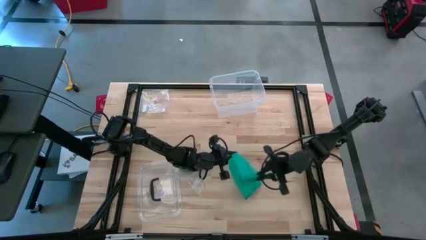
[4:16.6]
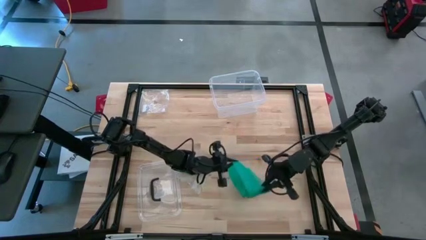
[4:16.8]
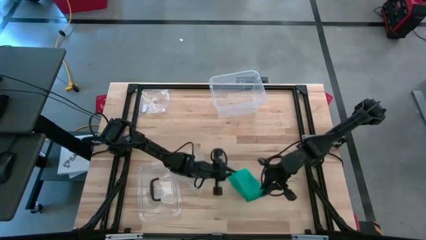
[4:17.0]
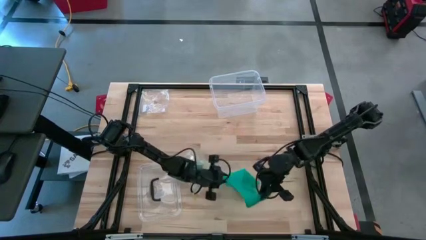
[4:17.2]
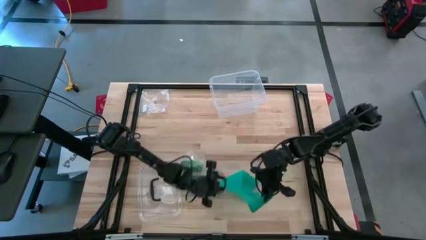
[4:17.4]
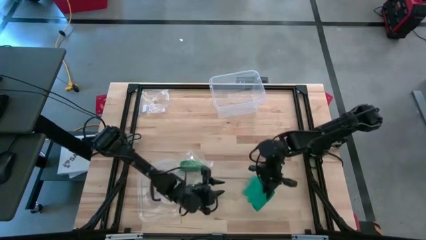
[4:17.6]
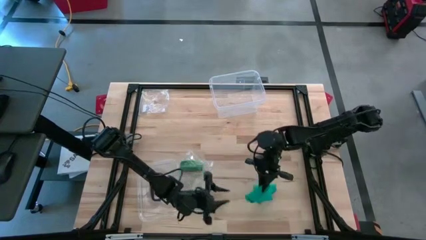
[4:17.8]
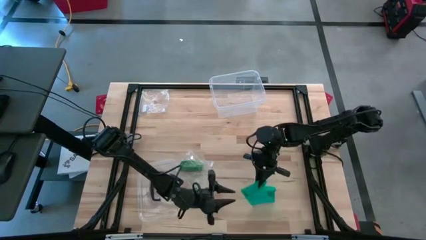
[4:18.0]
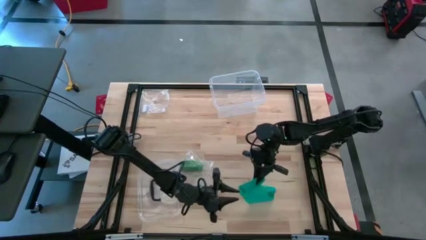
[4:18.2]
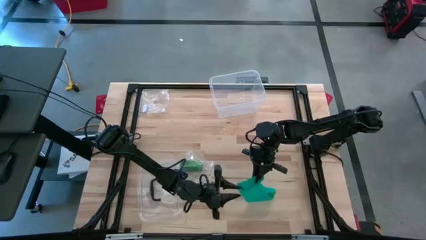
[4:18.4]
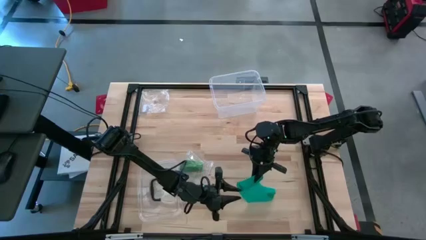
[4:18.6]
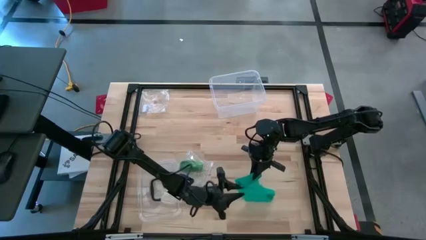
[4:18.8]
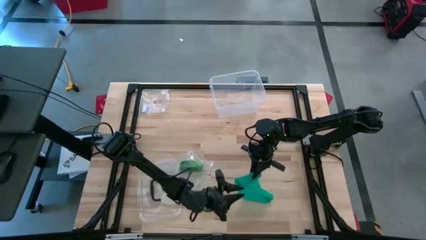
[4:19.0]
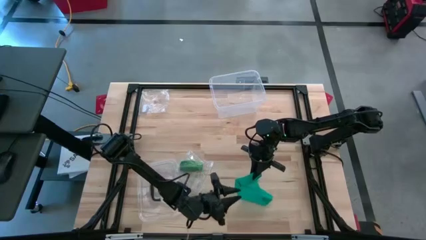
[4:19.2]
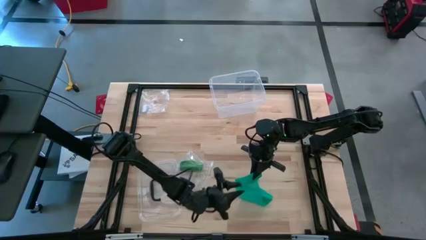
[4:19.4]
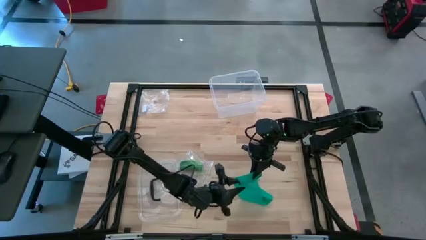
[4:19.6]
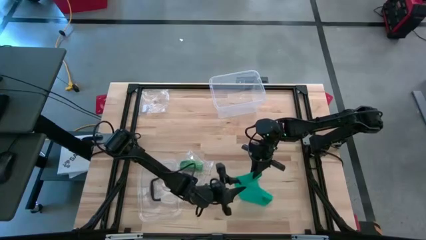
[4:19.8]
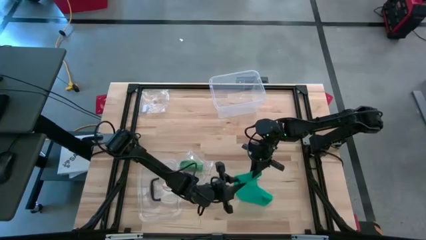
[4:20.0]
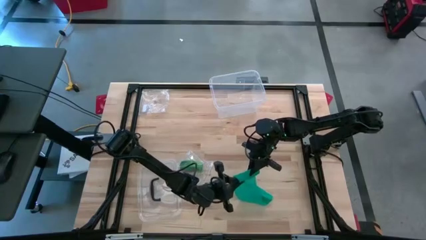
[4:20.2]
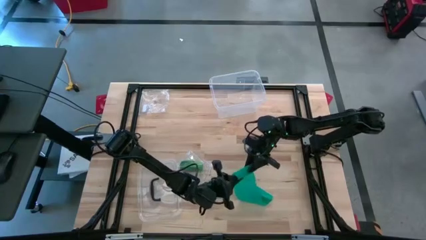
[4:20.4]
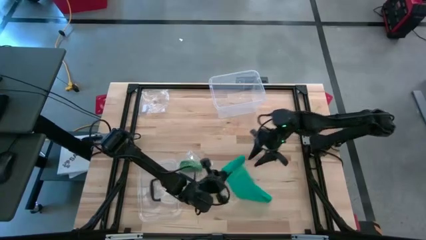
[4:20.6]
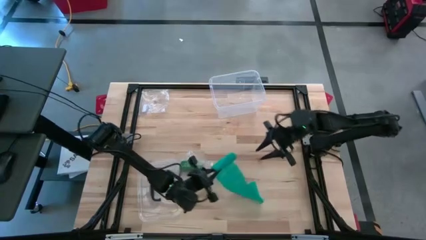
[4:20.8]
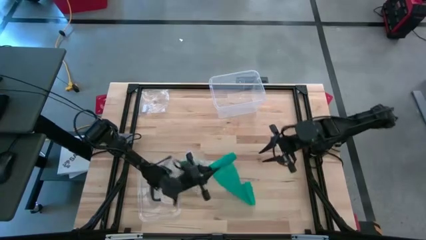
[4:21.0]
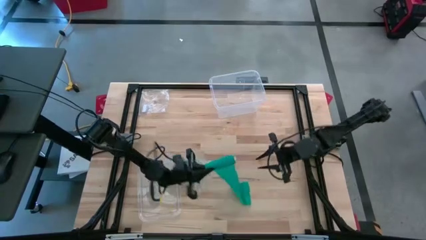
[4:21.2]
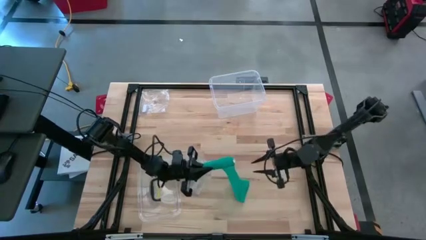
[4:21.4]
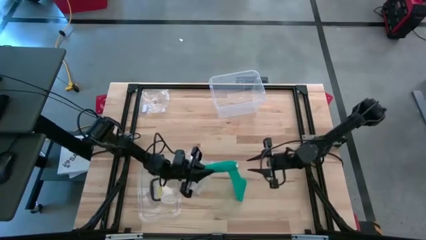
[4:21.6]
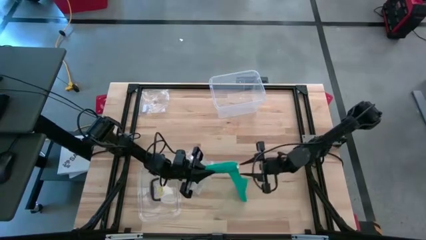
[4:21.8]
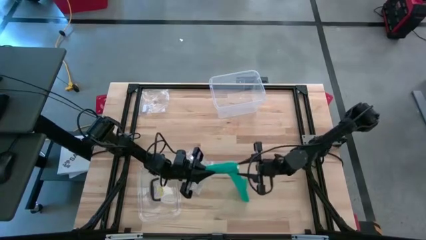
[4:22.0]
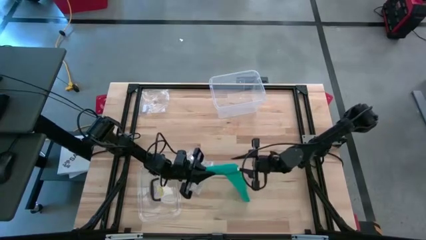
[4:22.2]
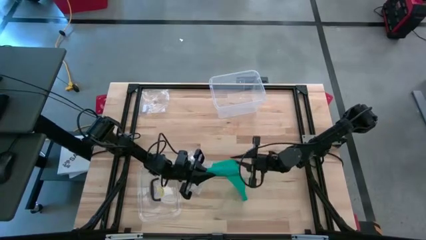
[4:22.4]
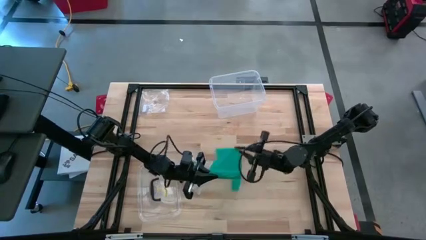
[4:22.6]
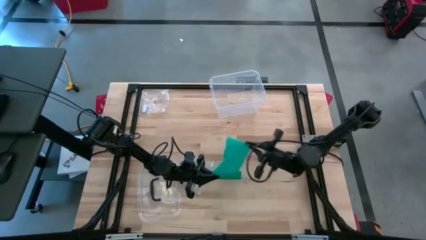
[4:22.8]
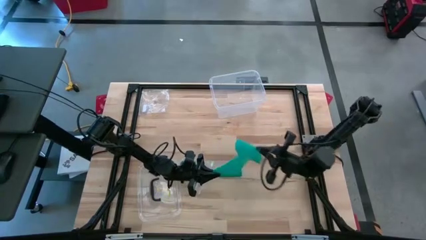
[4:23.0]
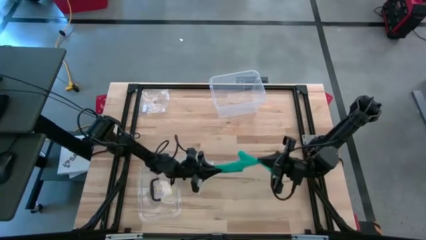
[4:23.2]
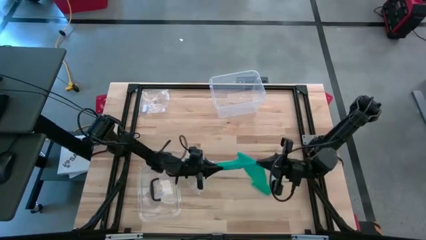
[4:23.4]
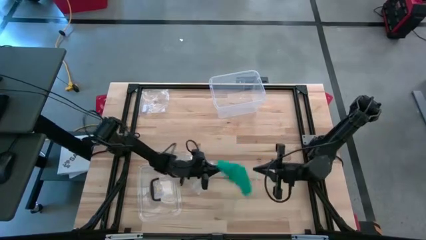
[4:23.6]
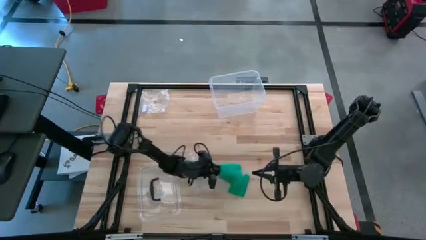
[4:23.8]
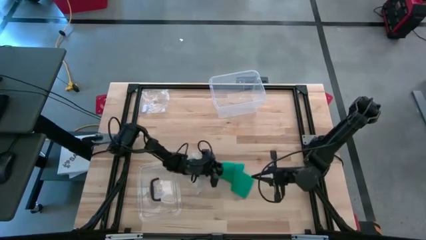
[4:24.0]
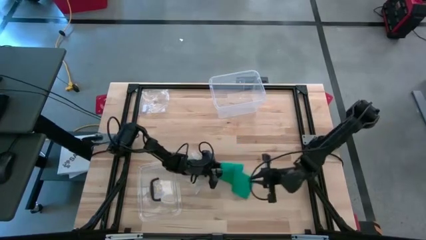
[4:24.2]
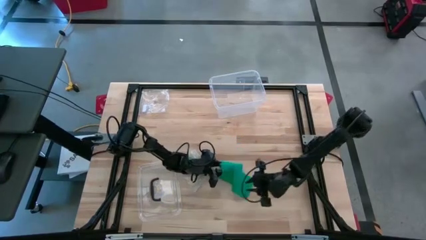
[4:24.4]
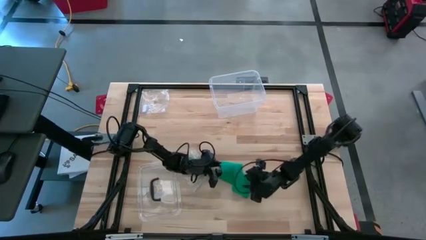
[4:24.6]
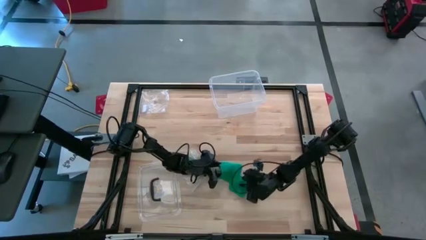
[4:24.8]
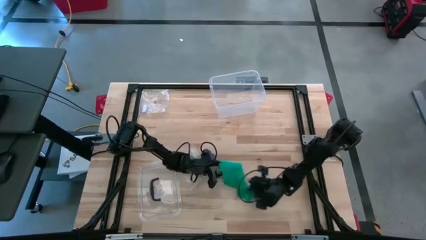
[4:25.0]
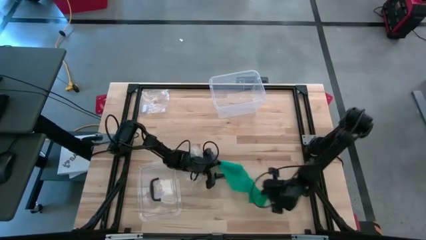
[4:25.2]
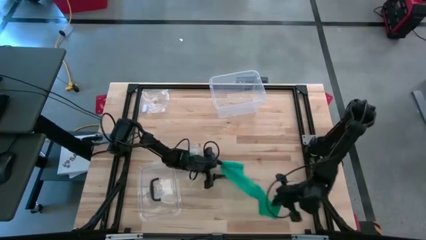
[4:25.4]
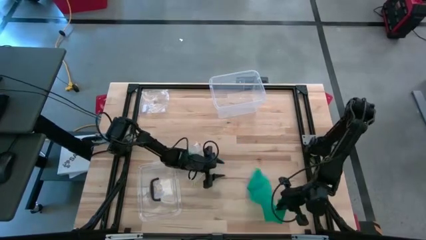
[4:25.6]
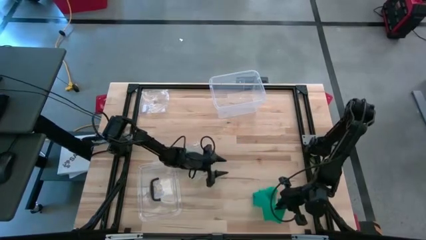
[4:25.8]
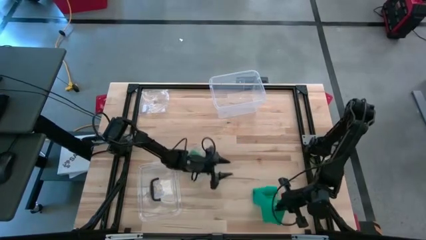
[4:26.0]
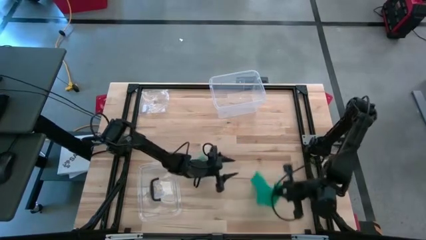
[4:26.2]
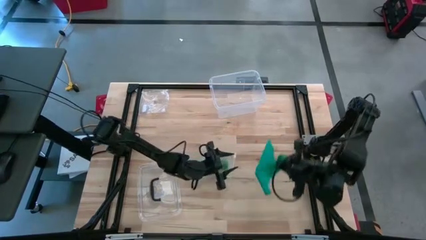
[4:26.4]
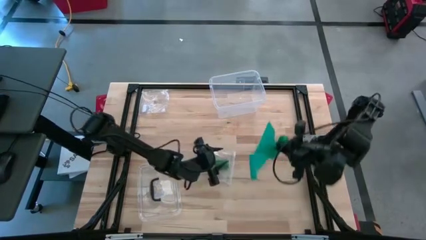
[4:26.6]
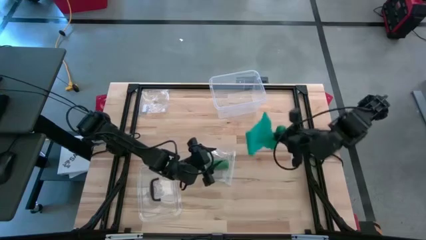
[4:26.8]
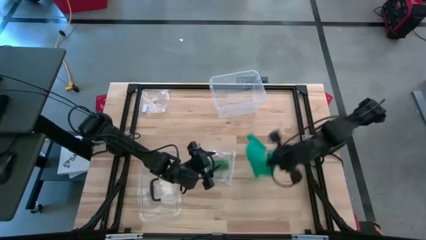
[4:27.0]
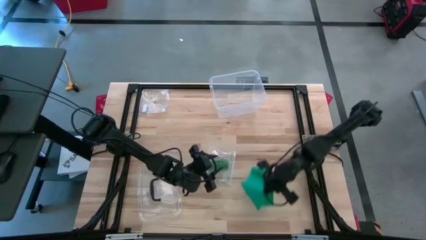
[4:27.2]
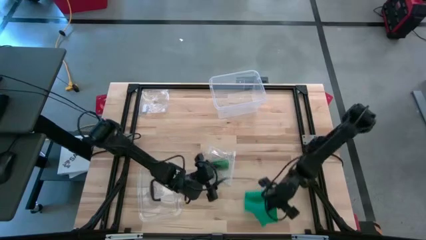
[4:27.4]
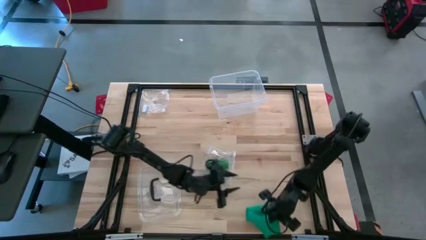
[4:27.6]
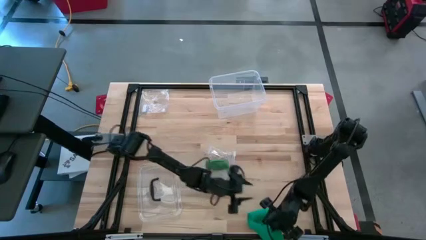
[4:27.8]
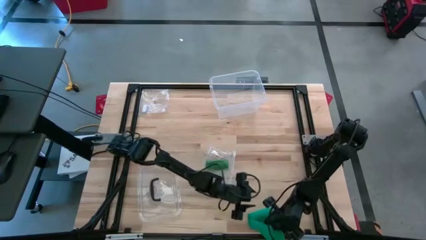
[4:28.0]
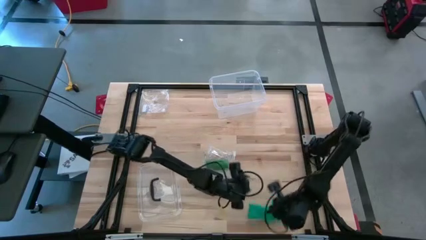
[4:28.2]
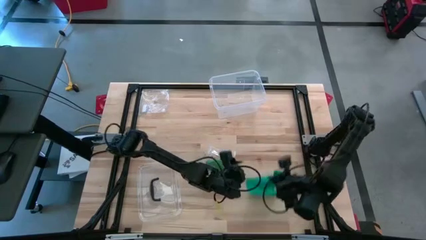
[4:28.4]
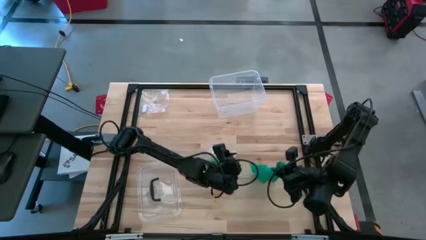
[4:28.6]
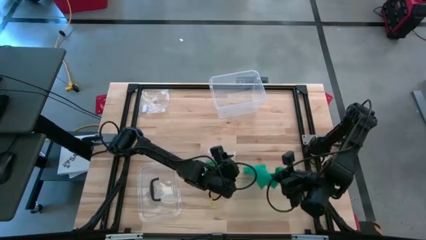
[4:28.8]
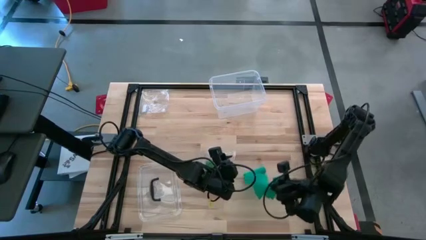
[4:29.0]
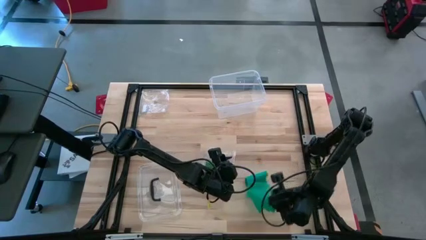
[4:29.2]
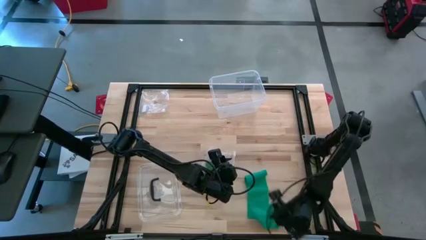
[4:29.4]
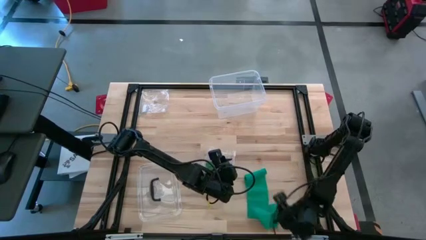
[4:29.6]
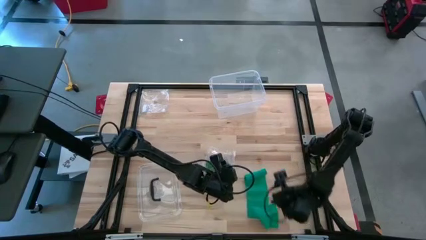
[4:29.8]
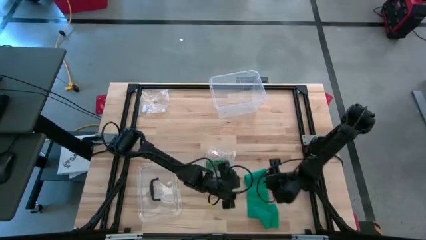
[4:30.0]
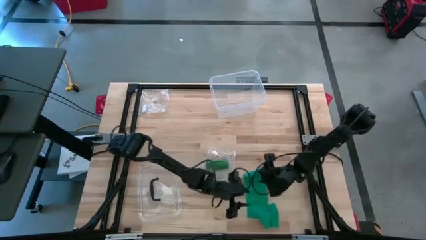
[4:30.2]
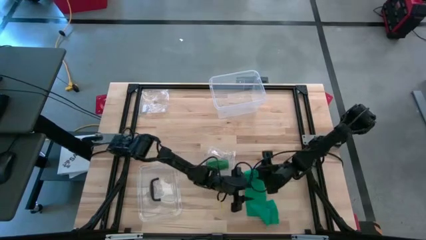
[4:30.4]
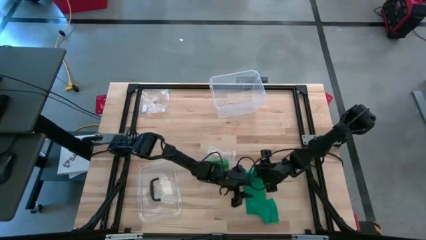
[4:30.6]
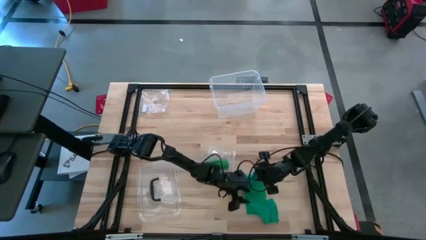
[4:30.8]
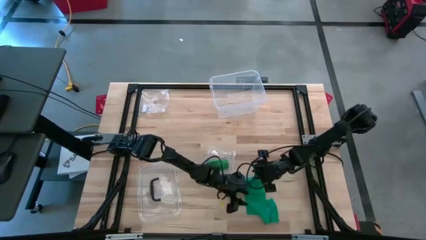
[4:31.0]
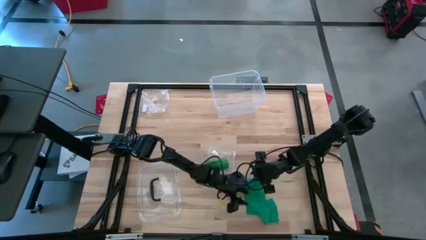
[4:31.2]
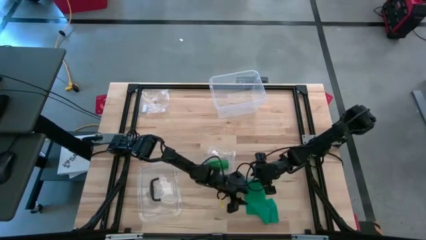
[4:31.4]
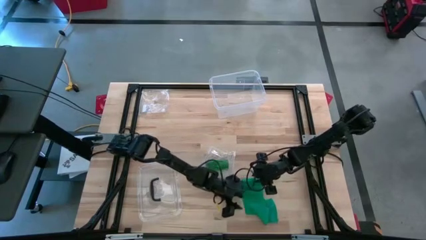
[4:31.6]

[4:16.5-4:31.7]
Task: Roll bandage
Roll the blue bandage

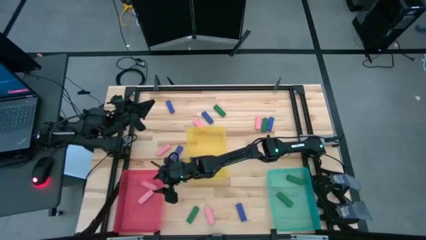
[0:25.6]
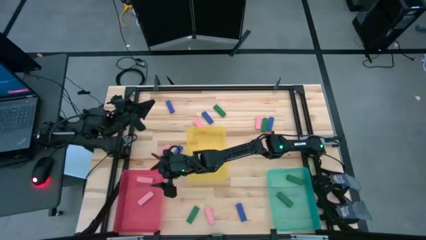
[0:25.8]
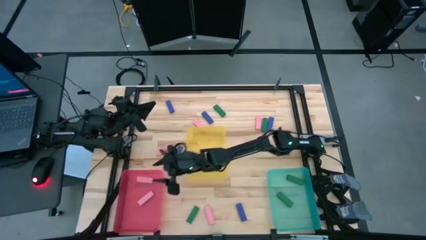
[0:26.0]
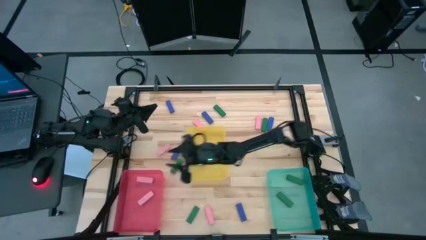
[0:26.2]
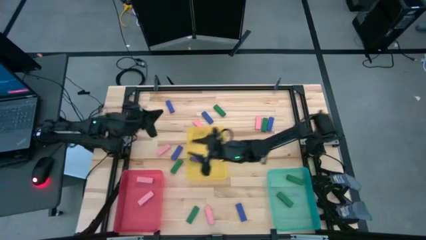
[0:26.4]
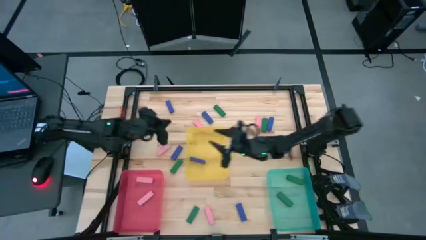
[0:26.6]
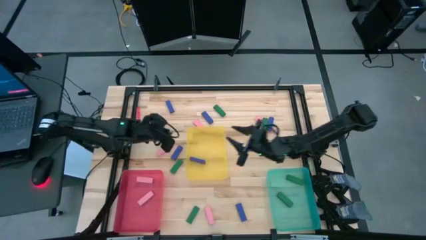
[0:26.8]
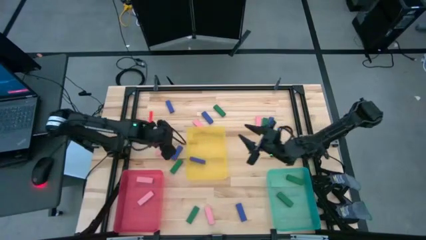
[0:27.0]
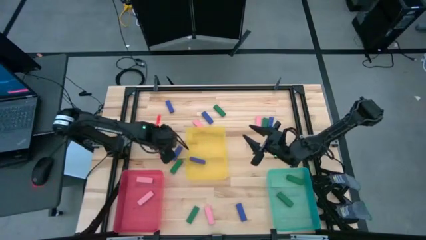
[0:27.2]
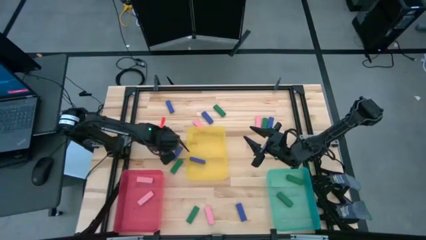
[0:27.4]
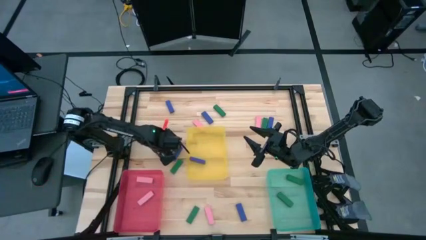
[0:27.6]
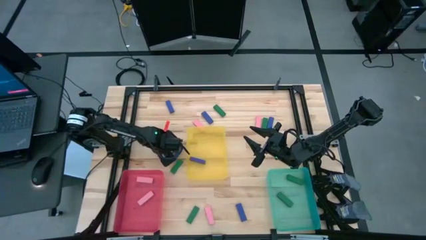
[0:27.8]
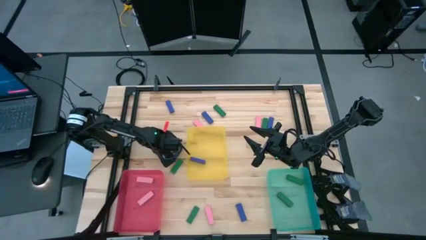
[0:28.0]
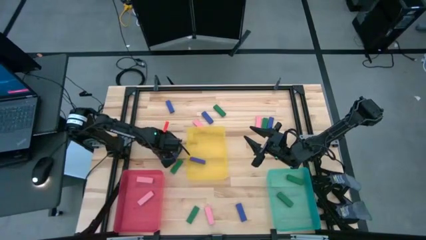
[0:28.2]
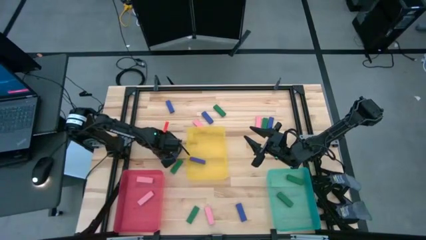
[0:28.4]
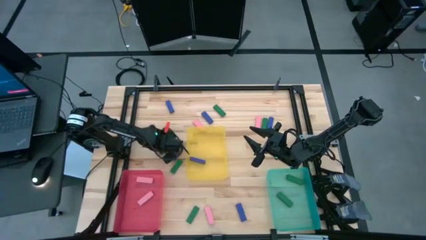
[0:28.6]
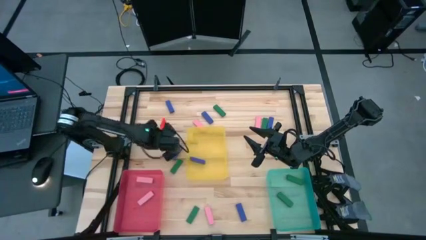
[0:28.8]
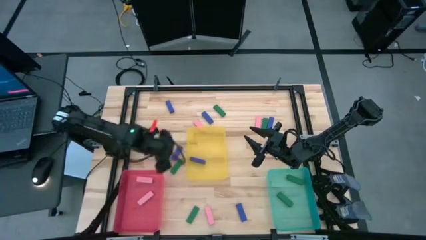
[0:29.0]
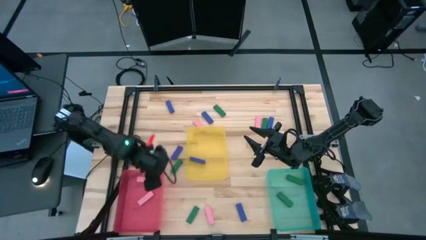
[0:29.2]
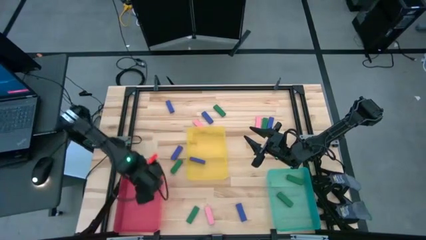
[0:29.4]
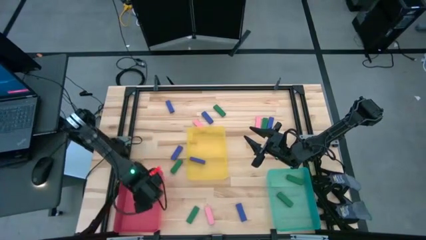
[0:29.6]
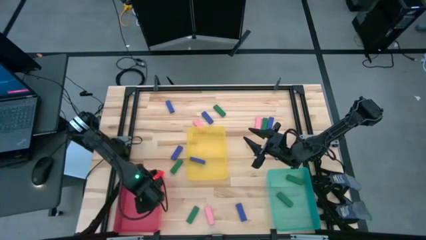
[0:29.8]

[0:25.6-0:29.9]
Task: Sort blocks
Put the pink block into the red bin
